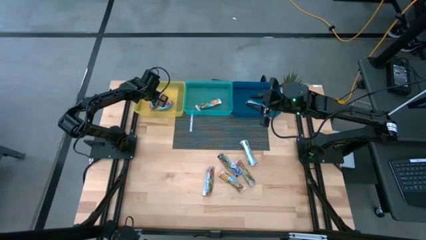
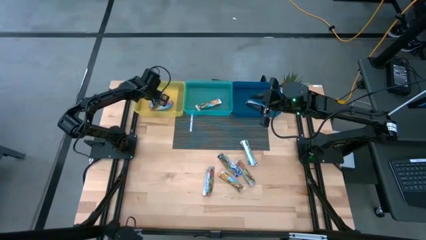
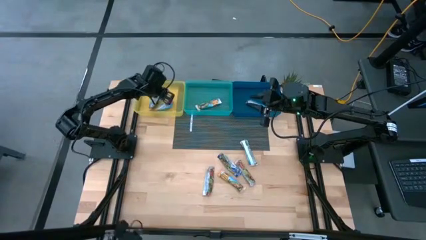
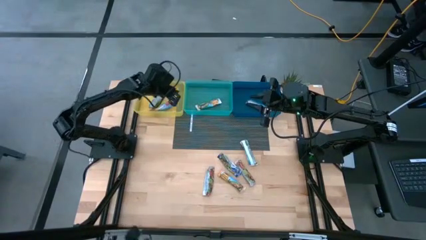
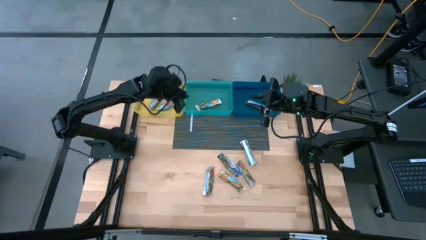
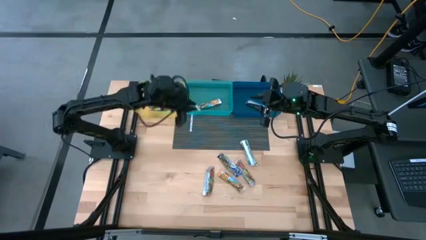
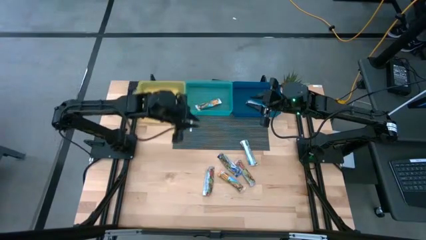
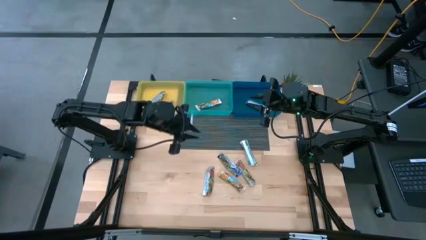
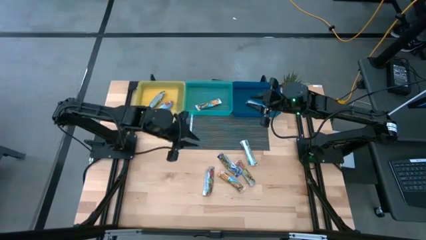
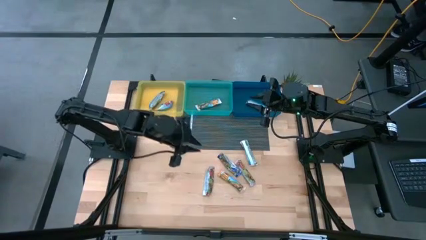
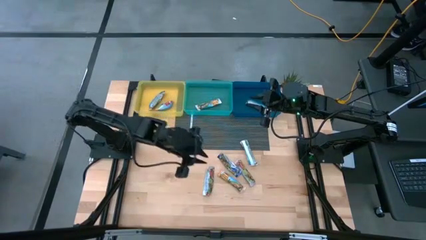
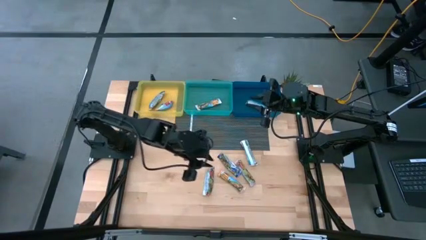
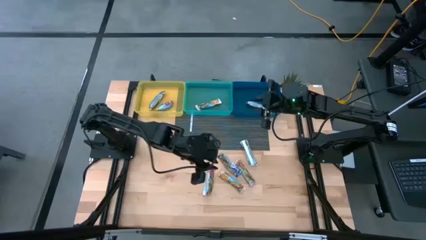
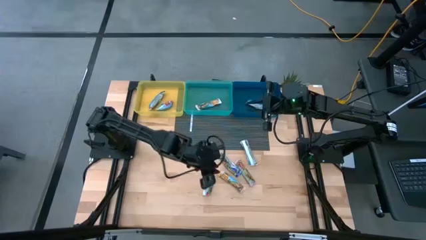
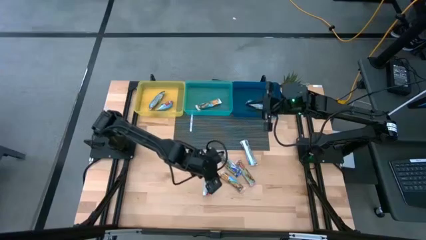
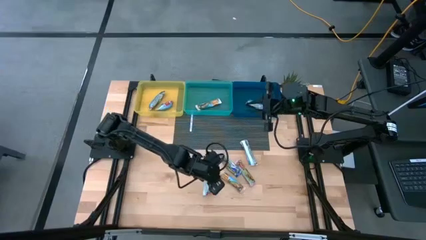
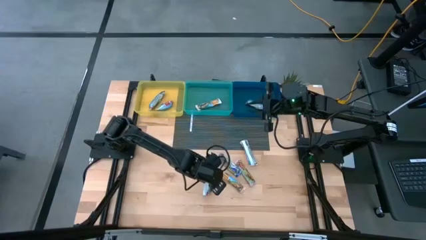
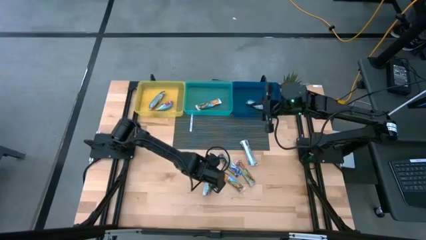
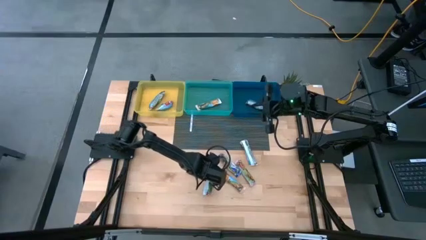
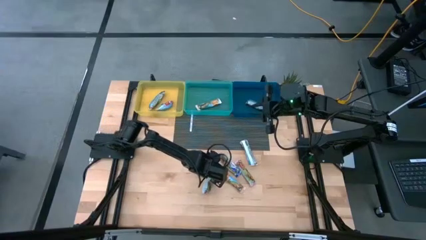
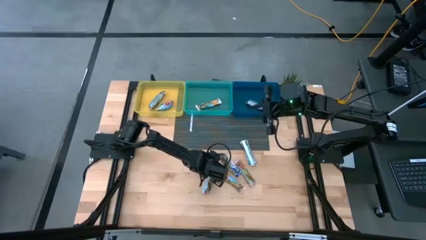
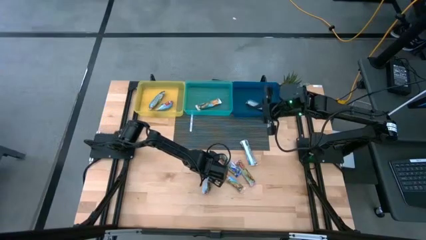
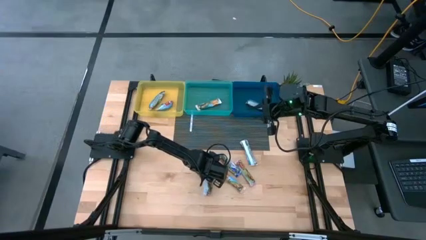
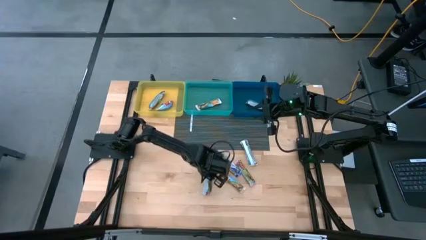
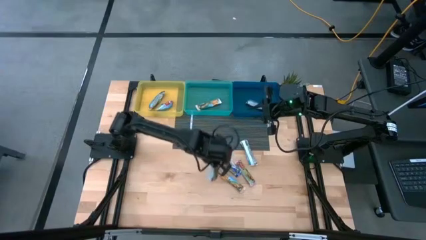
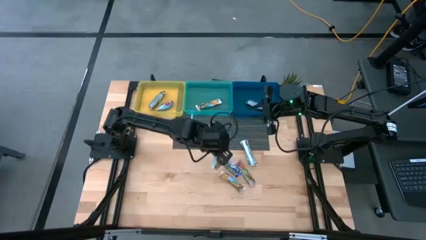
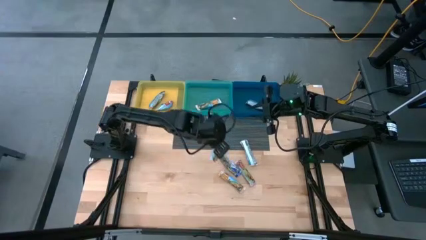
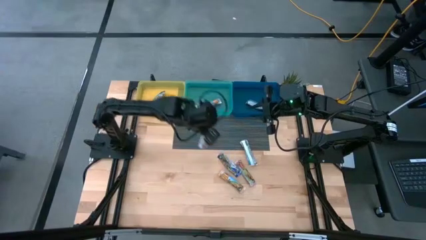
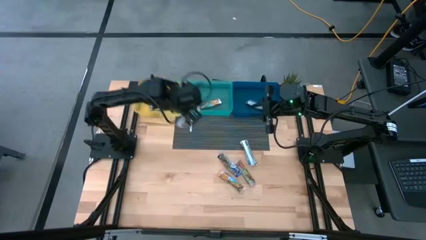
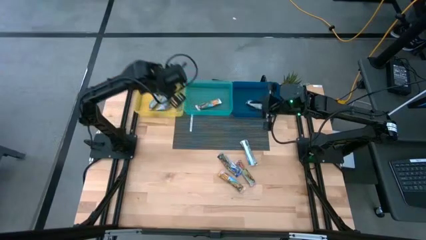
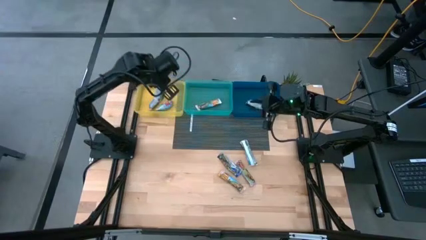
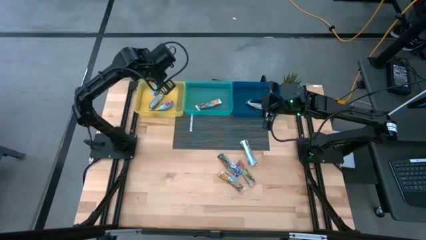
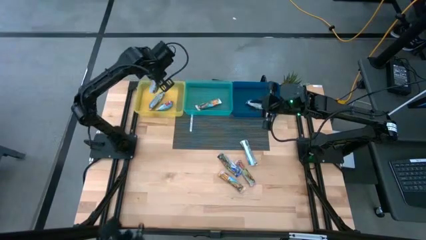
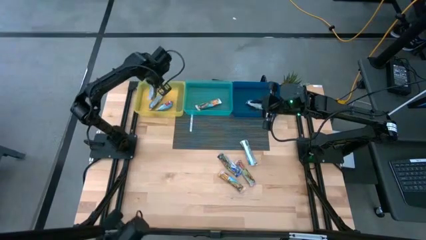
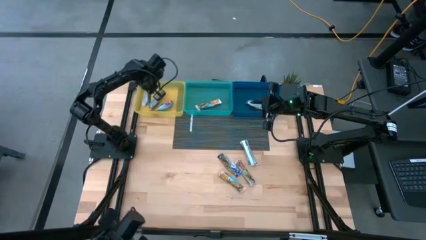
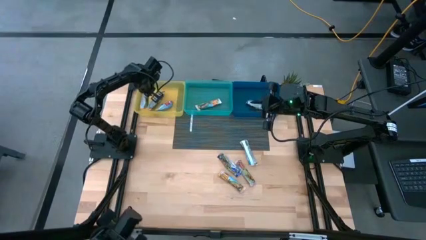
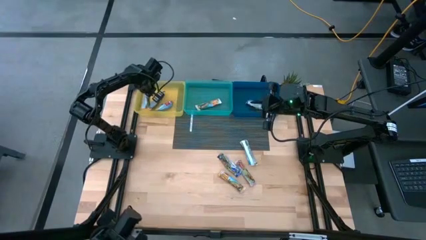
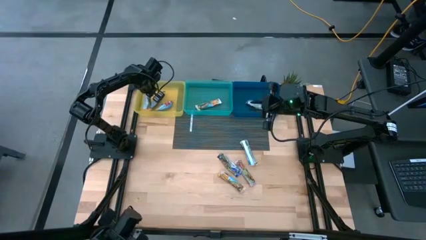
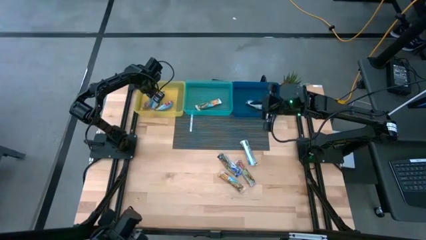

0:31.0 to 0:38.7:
Task: Pick and place Granola Bars by type
Put the red granola bar into the yellow bin

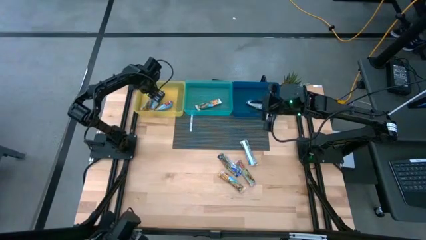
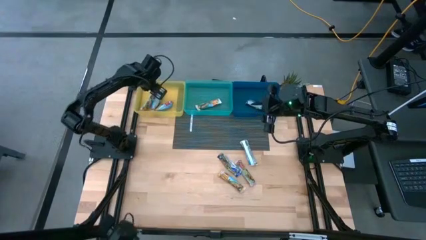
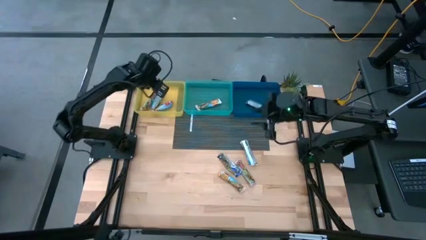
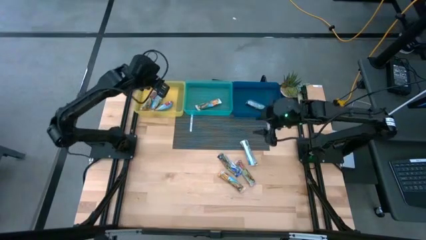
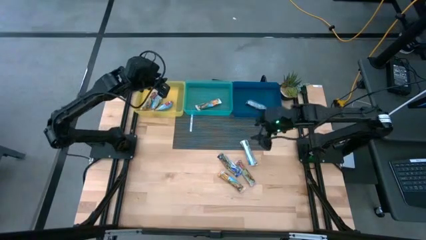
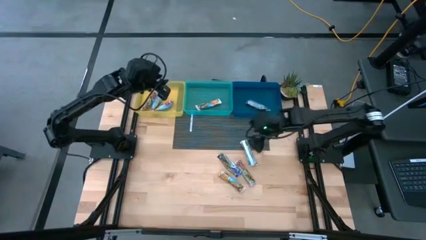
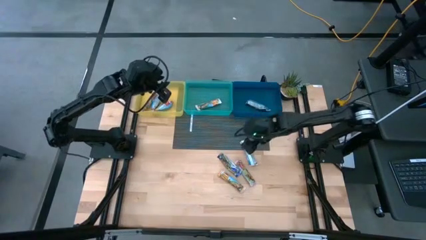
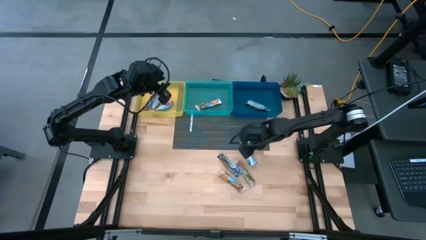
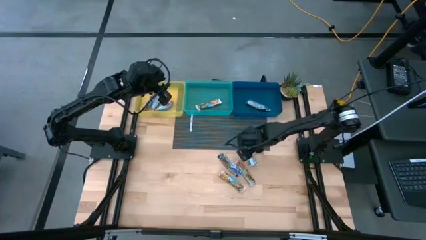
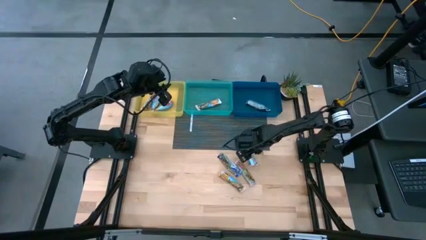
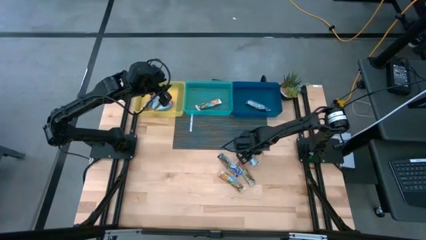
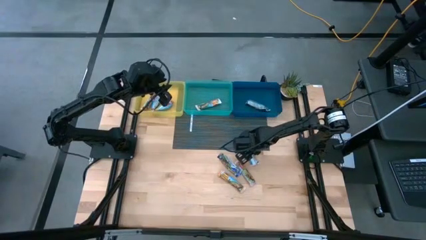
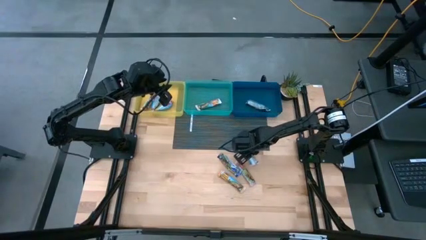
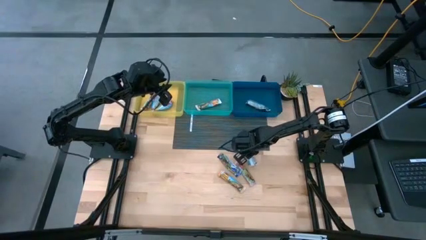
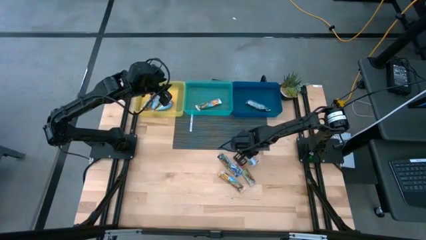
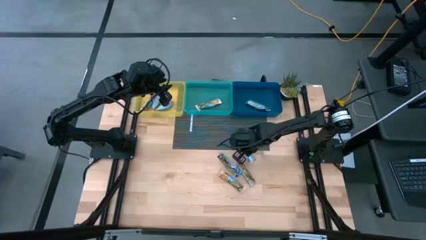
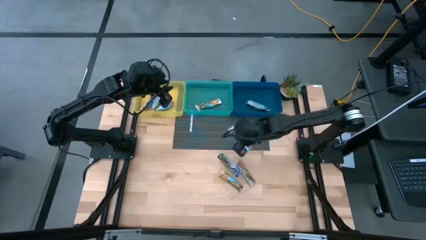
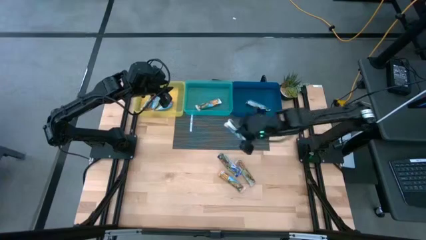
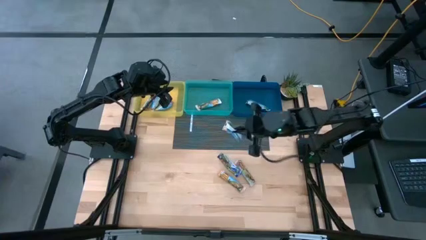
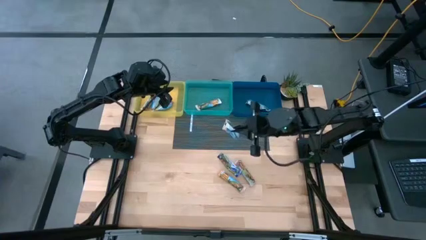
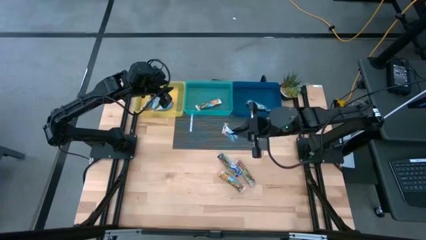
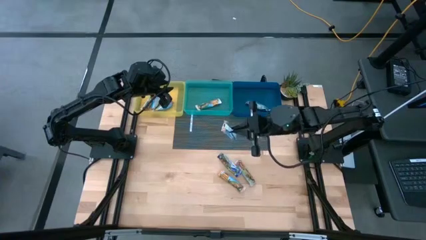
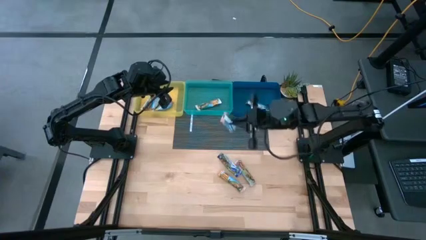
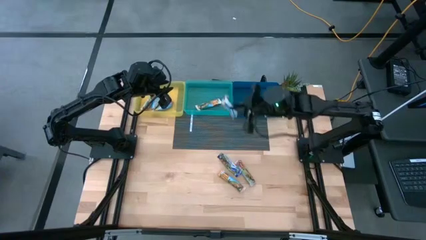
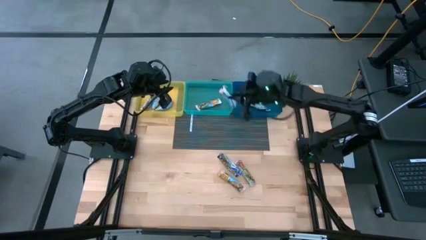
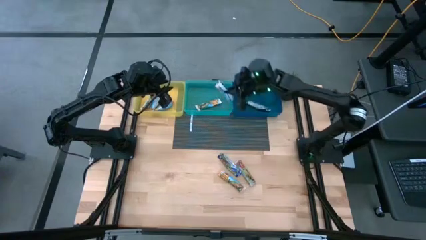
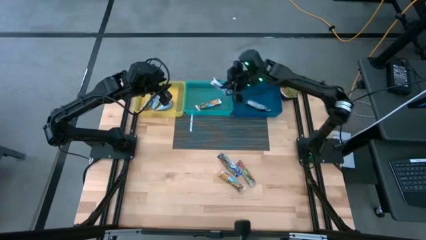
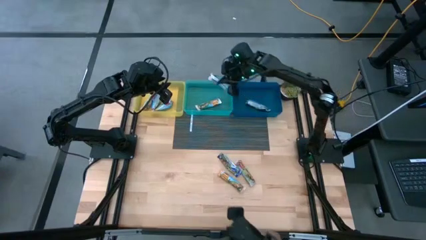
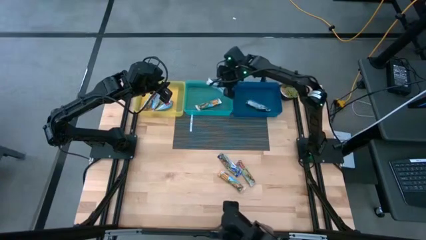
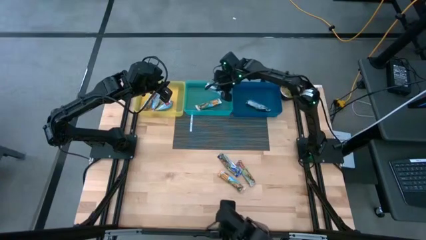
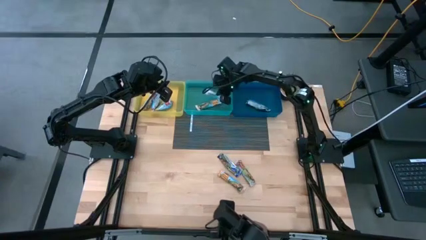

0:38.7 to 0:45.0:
Put the yellow granola bar into the green bin

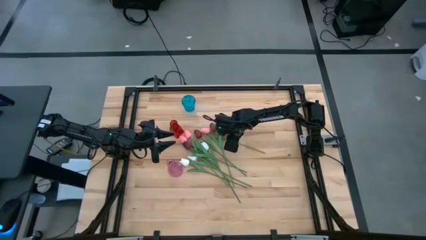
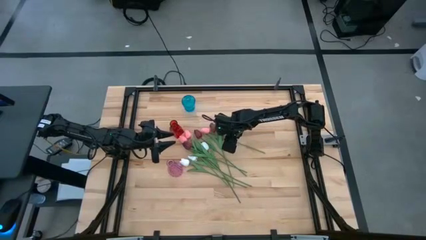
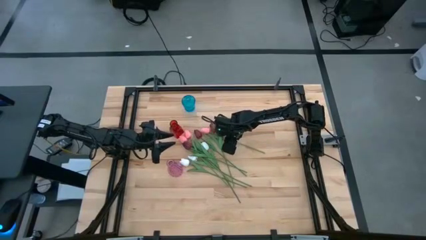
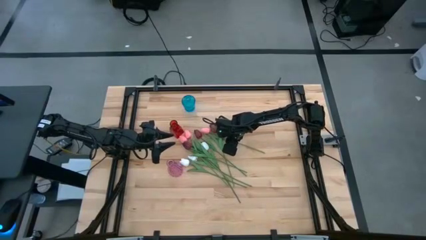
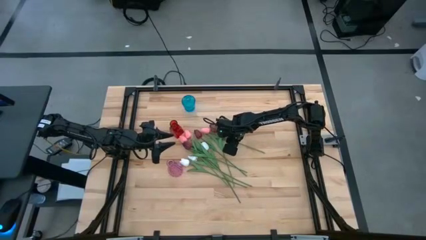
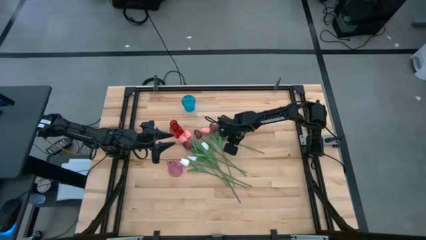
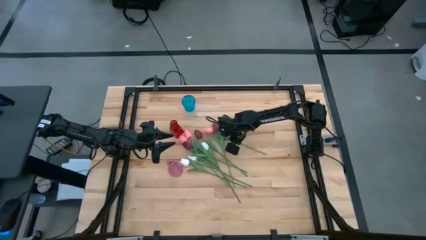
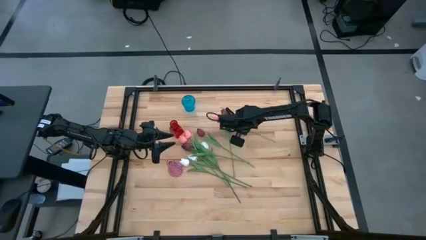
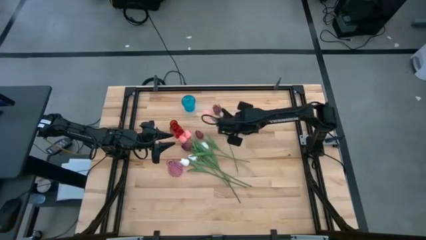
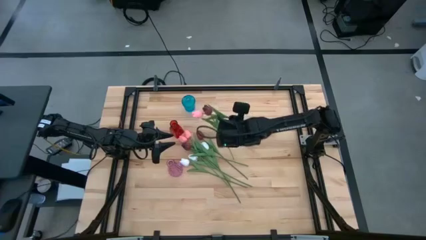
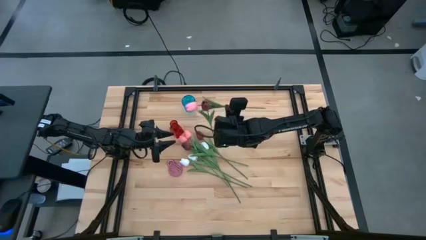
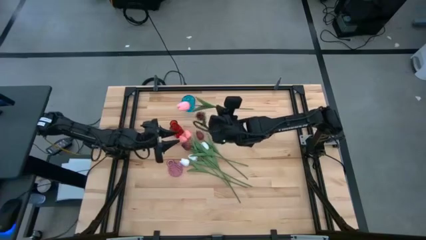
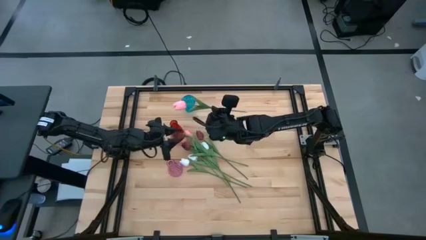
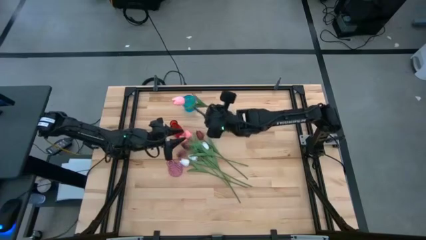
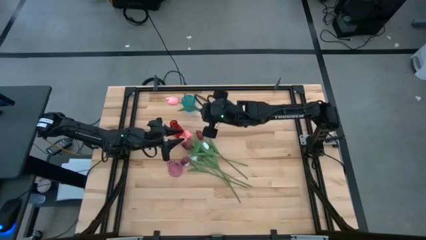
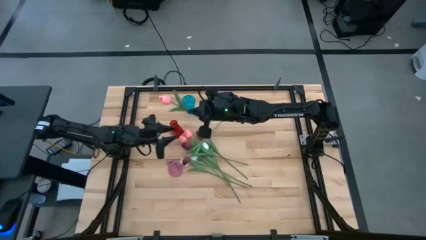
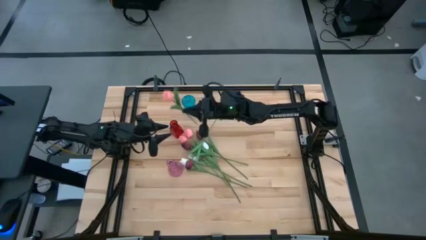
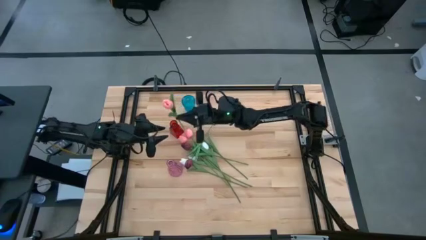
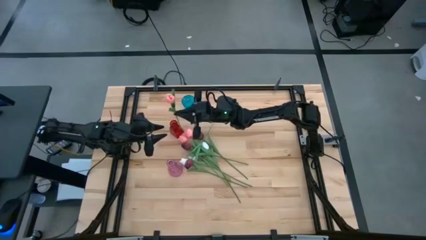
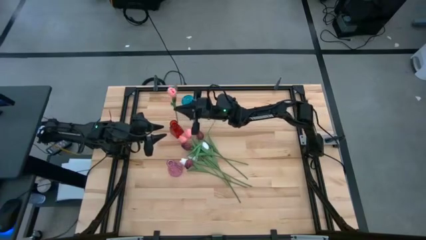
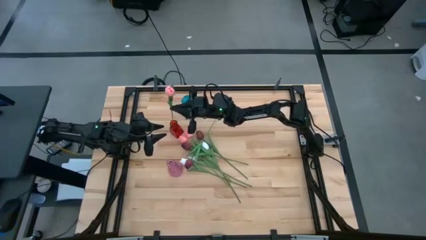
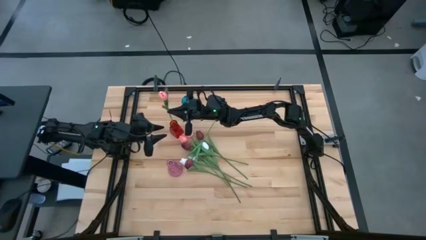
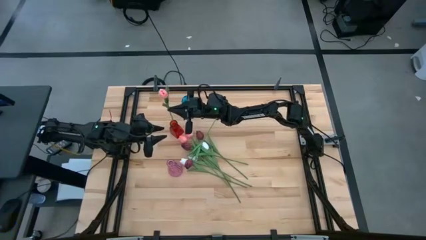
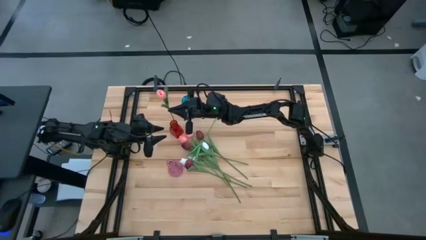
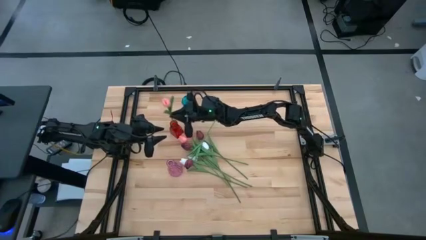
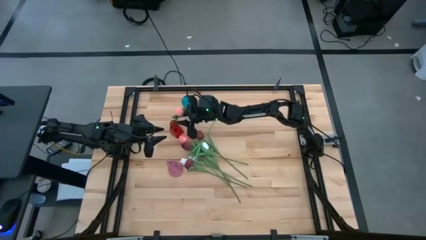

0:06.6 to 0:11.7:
Task: Sort flowers into vase by color
Put the pink tulip into the red vase
